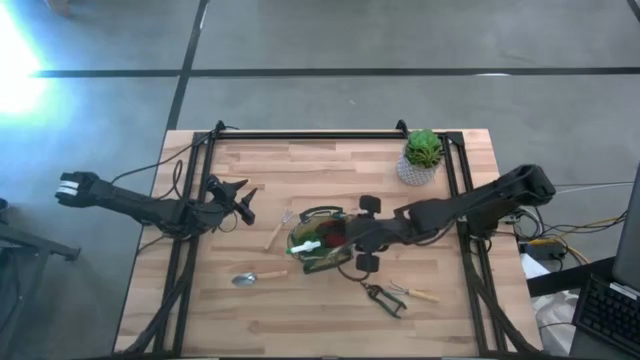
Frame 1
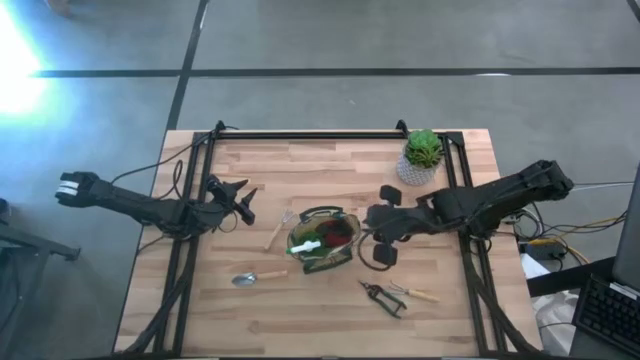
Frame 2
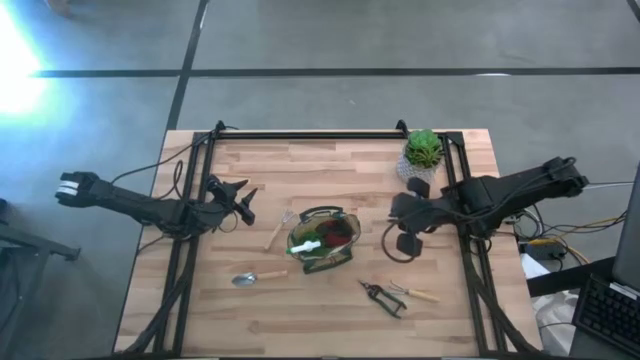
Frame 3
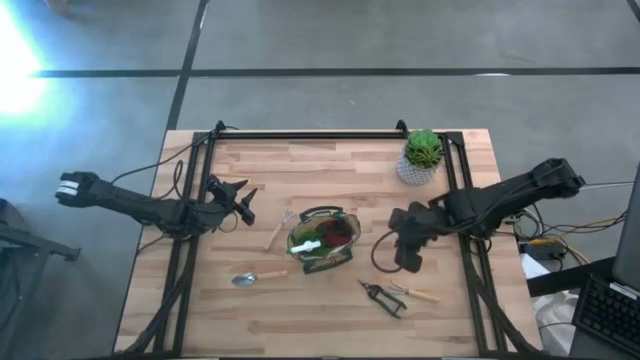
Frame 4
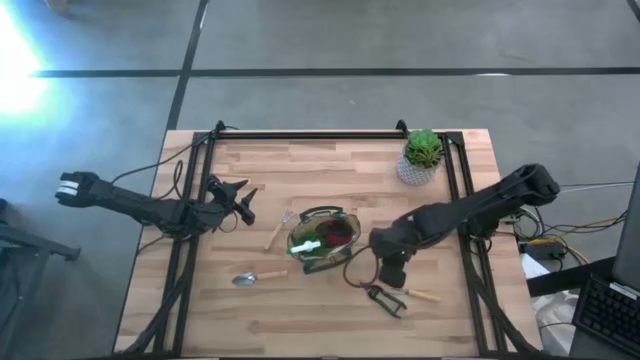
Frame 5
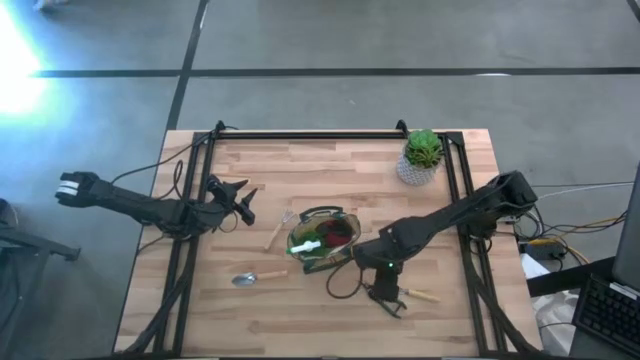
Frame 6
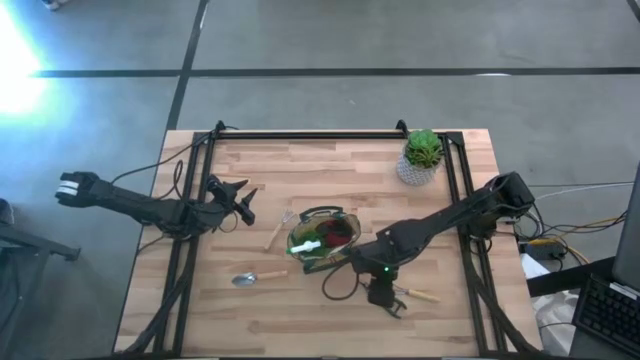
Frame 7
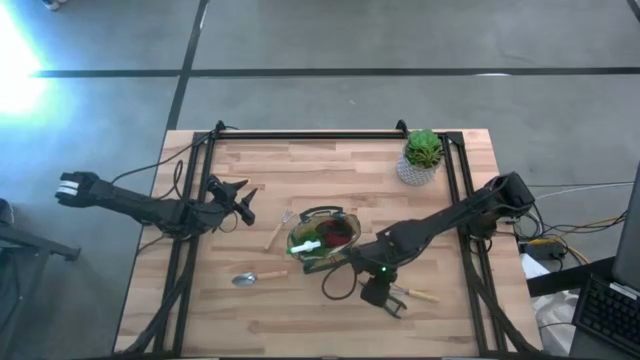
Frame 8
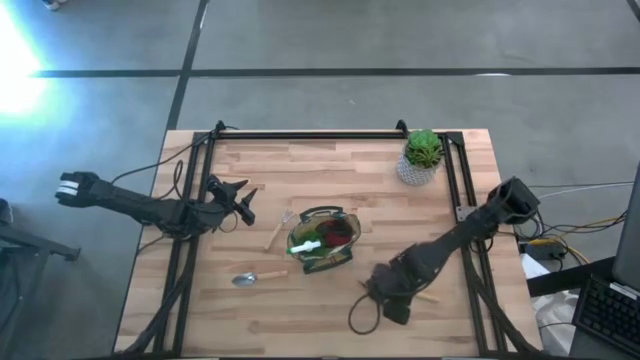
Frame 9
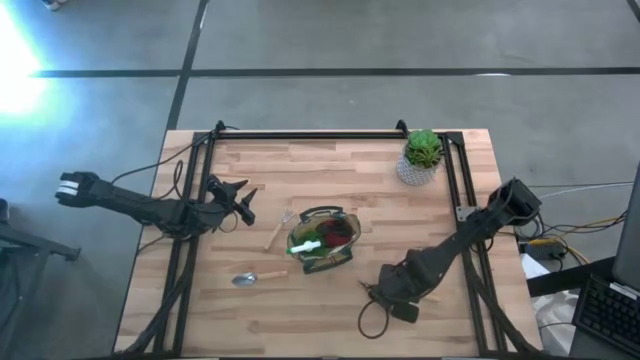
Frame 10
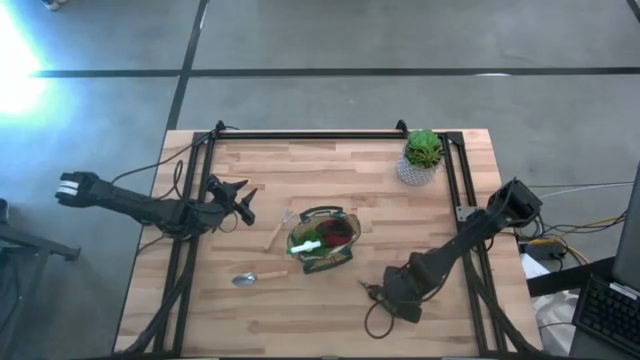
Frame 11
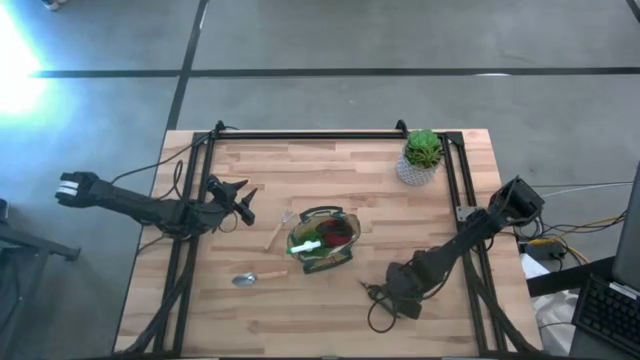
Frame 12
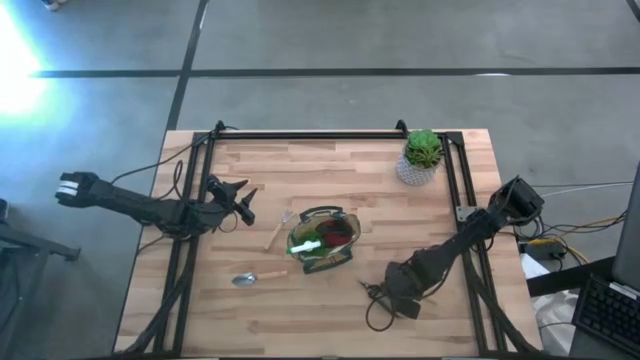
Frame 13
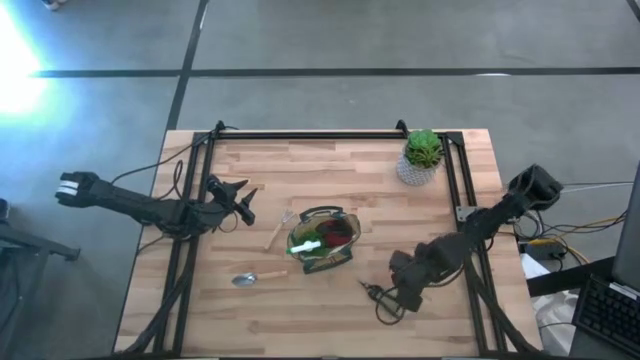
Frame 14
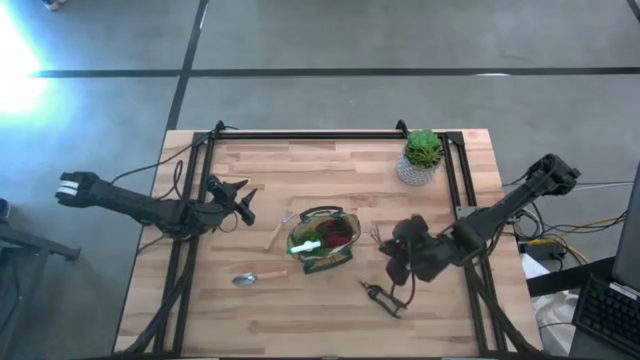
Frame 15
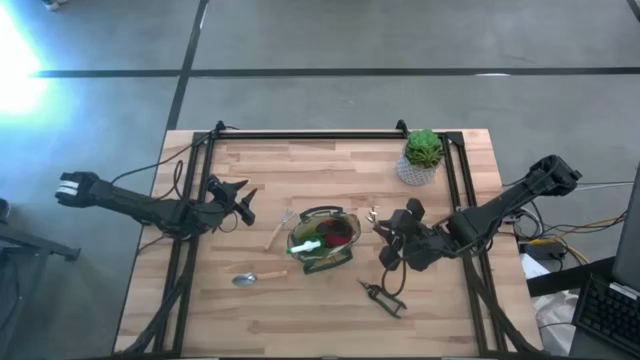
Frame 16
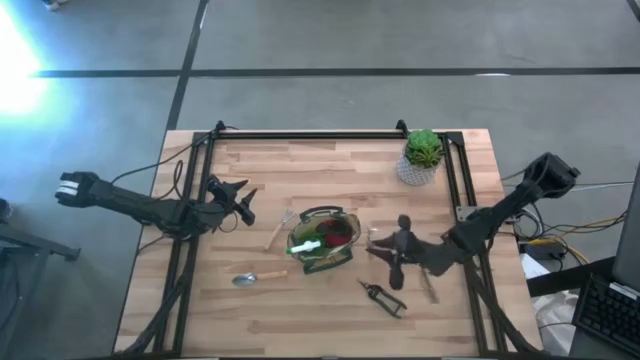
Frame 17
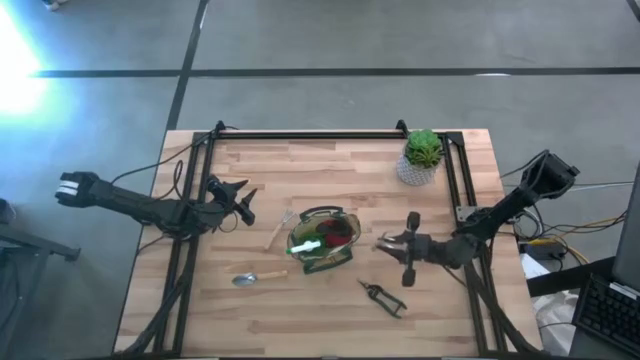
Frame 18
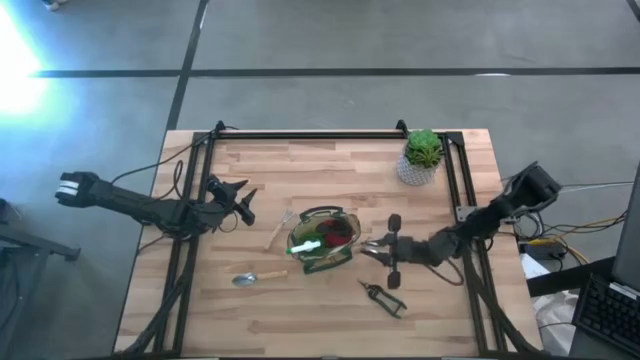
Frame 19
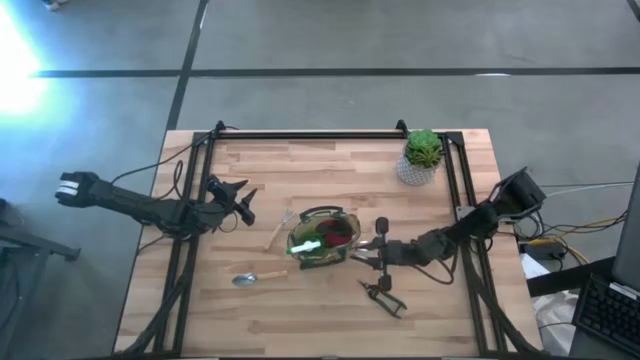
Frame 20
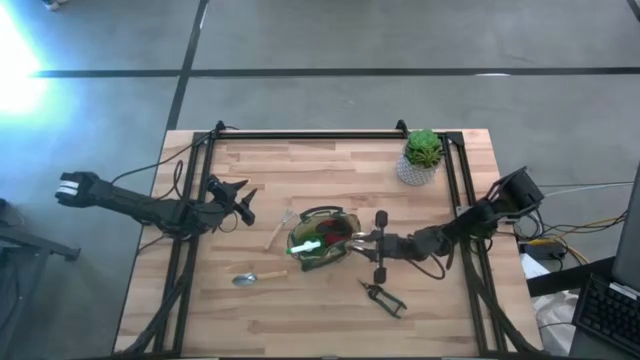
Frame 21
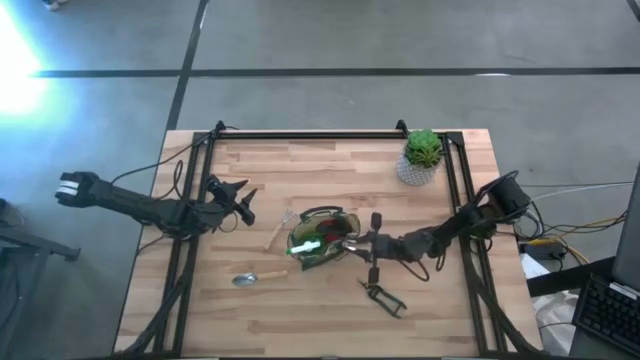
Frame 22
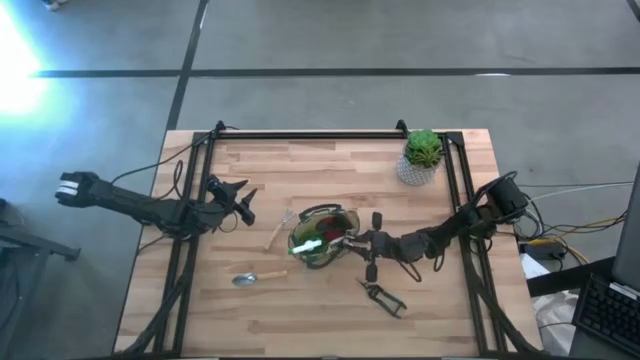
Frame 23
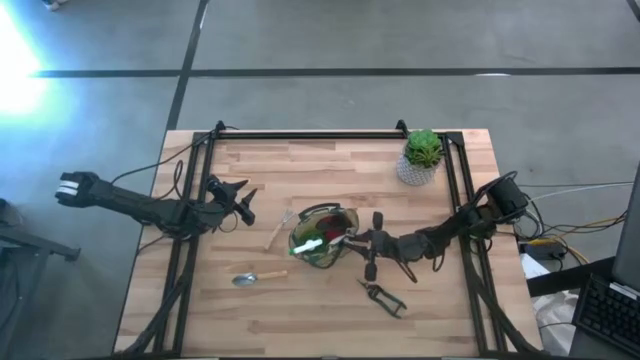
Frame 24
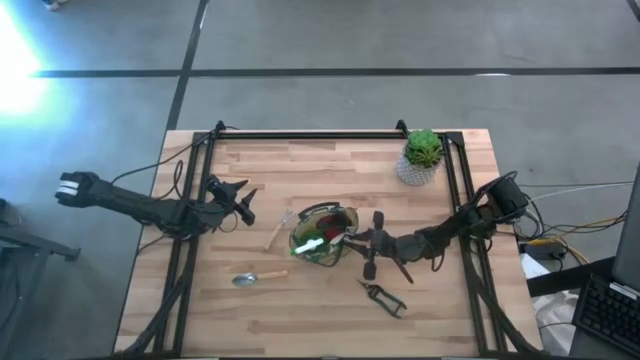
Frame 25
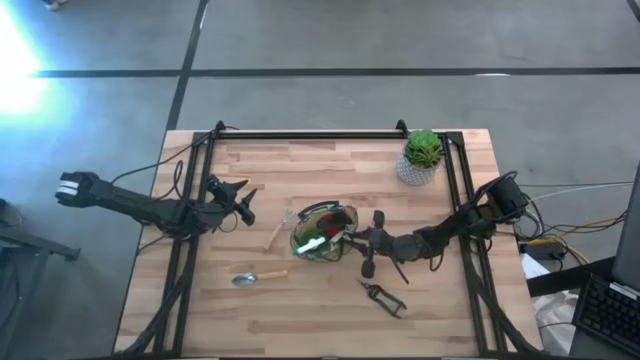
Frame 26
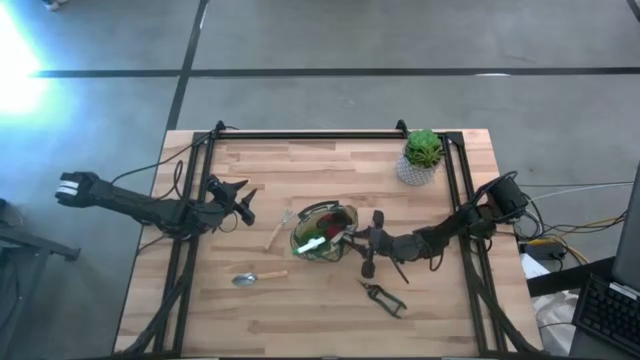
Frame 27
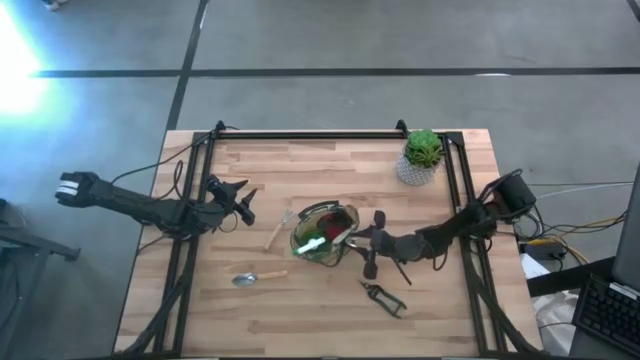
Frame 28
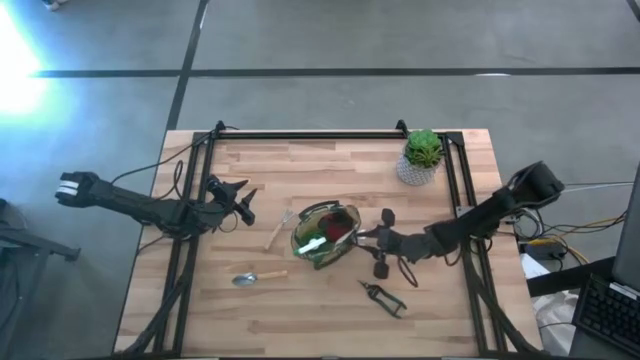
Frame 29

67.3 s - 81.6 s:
Task: Pick & Place Garden tools in Gardening bag
Put the right light brown hand rake into the green gardening bag

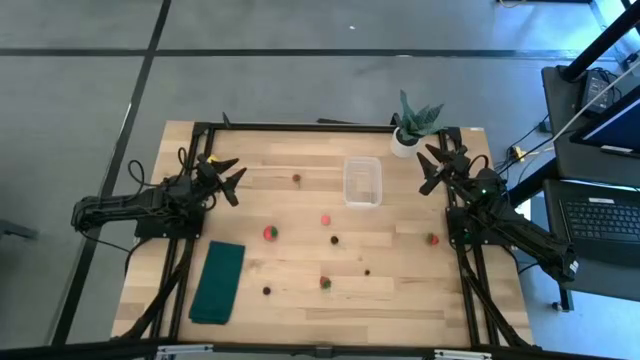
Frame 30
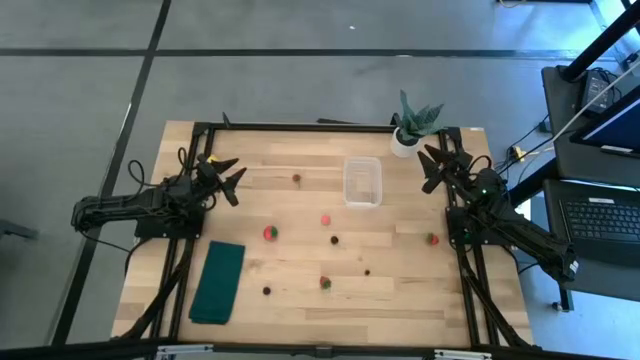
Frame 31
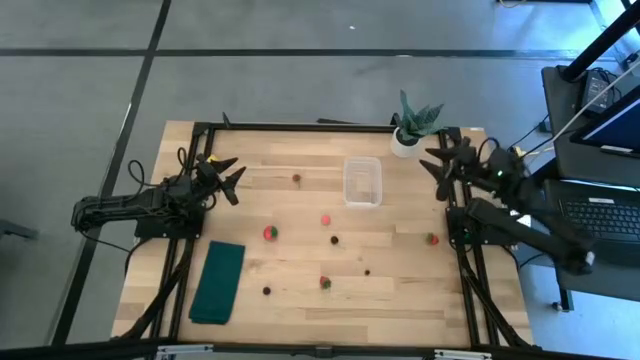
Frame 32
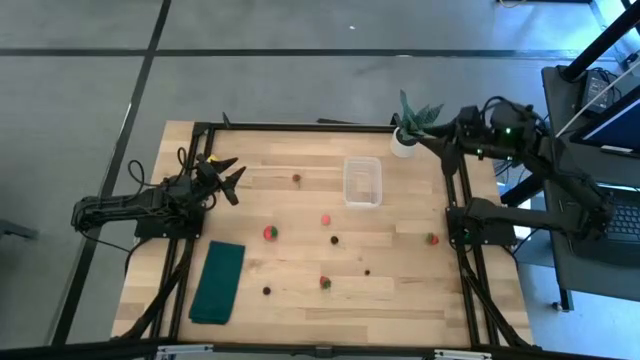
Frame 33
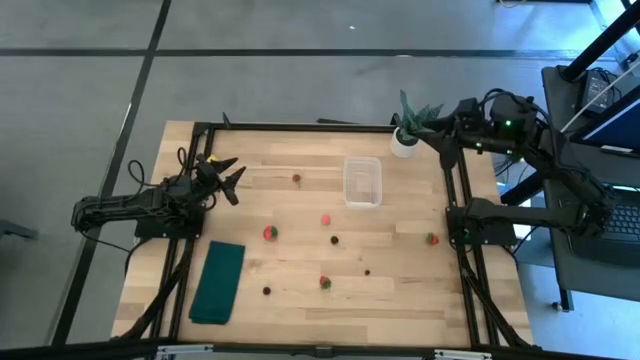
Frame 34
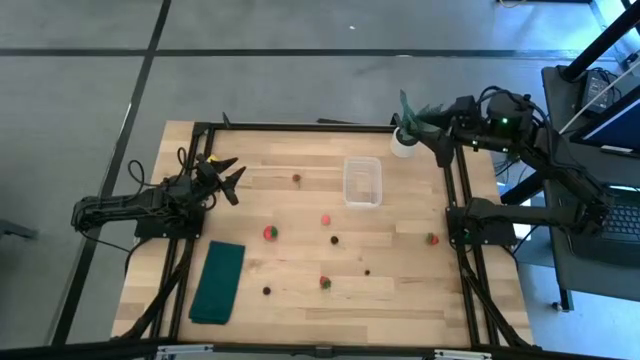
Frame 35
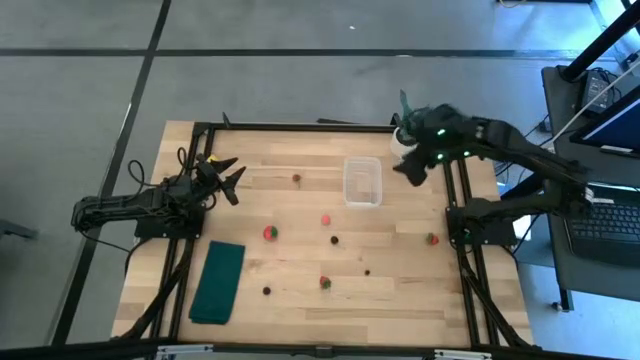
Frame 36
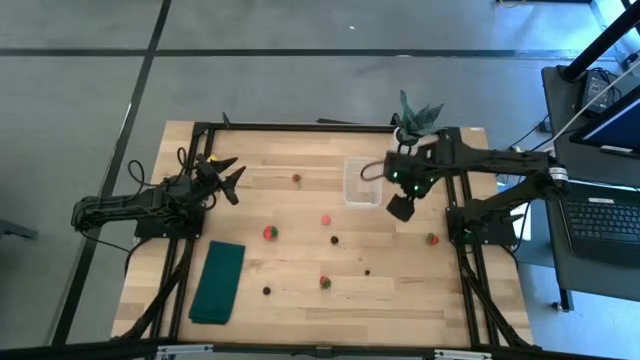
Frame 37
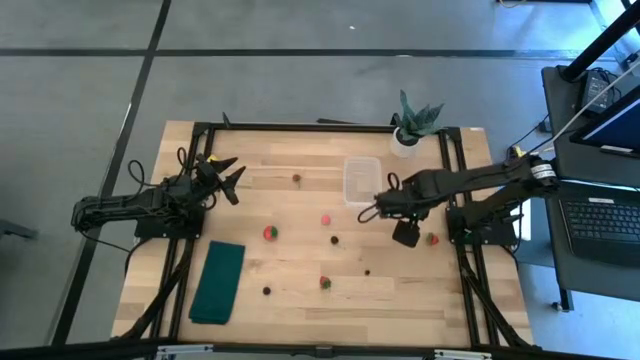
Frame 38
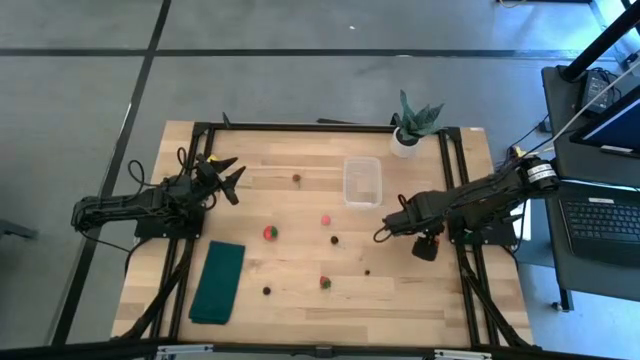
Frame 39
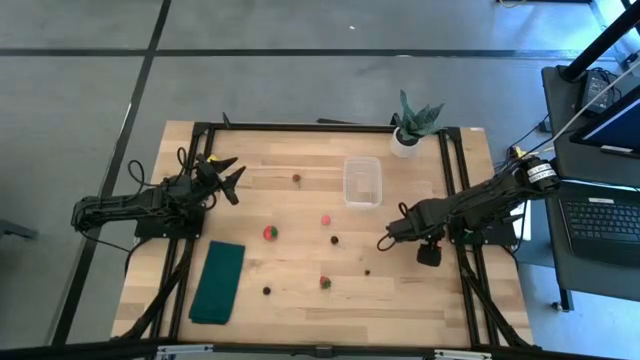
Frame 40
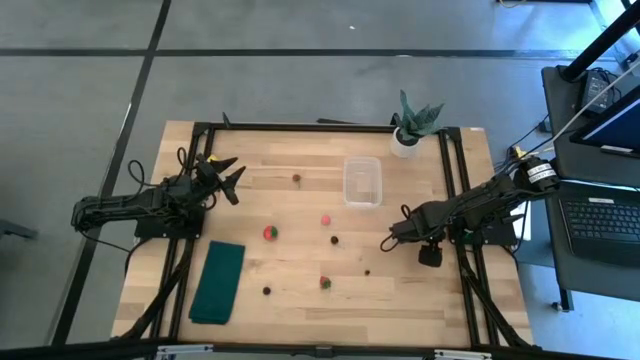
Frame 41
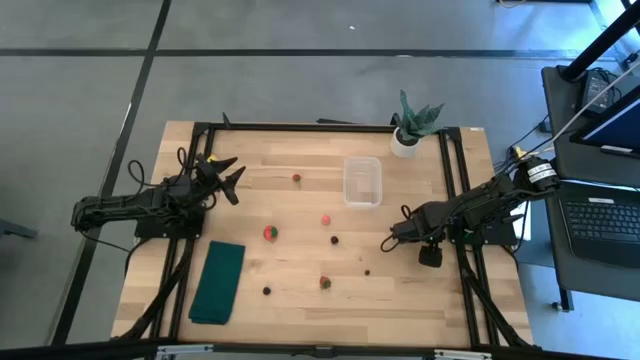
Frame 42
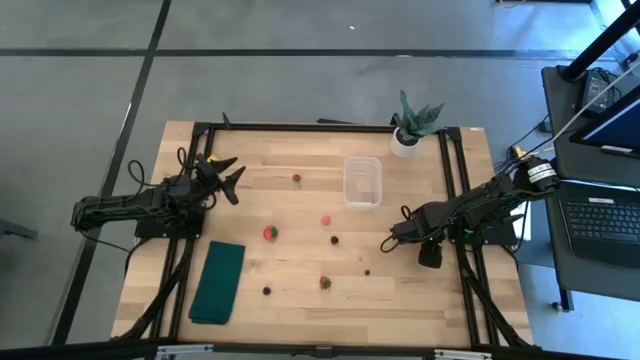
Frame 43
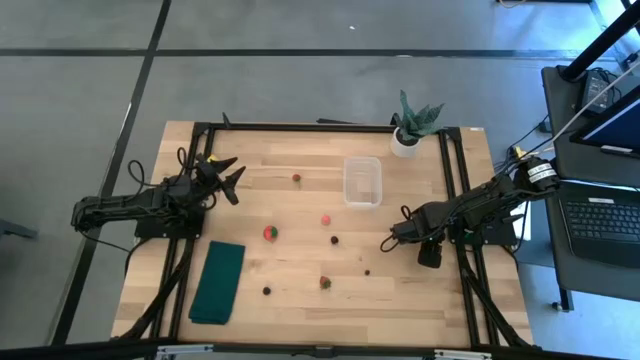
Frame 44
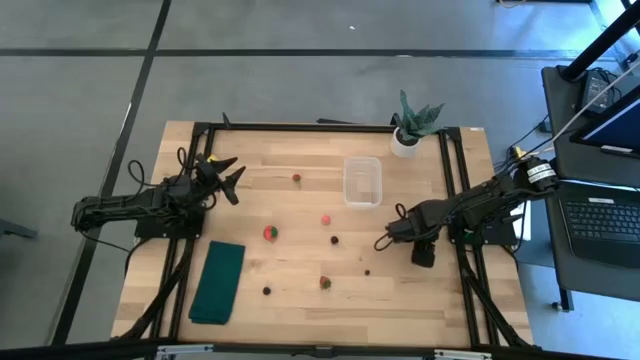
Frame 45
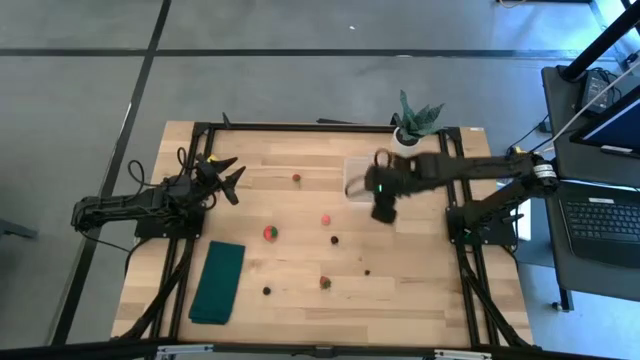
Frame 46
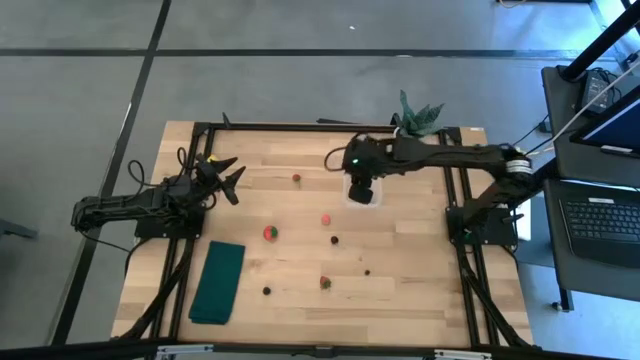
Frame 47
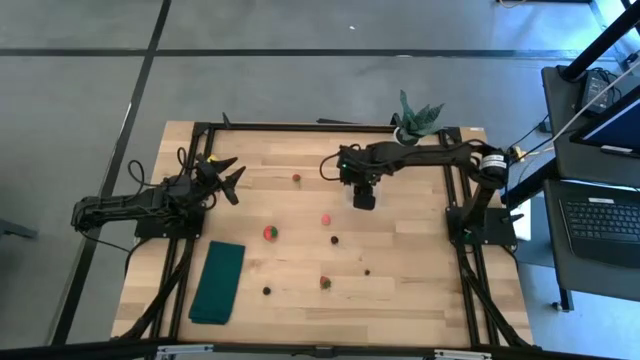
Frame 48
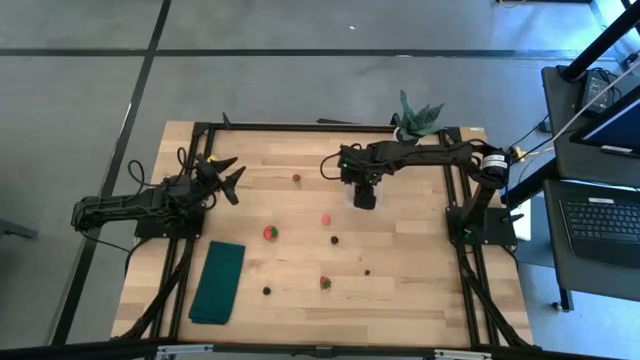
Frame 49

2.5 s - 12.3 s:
Task: Pick and placing Produce into tupperware
Put the middle red strawberry into the transparent container
